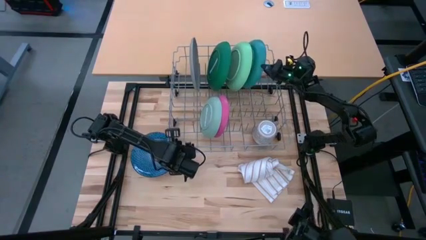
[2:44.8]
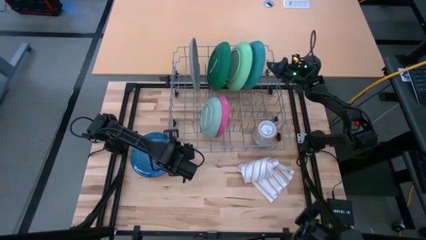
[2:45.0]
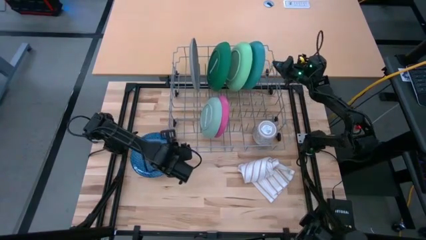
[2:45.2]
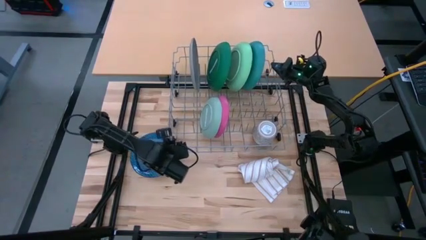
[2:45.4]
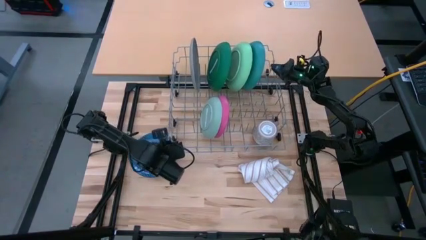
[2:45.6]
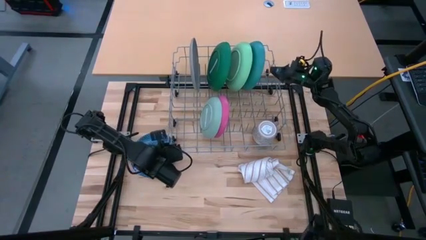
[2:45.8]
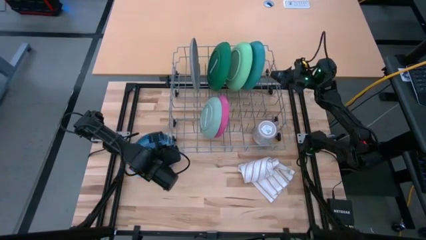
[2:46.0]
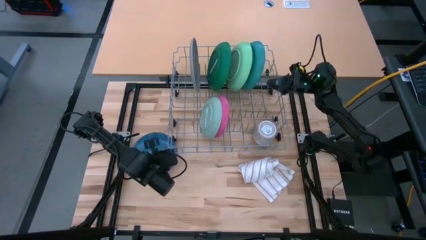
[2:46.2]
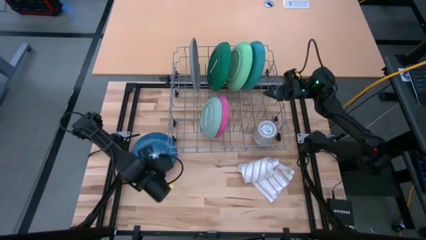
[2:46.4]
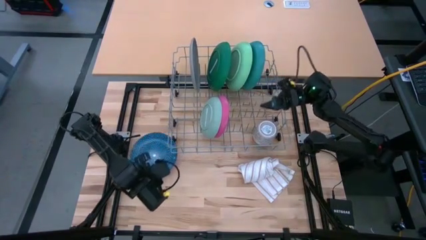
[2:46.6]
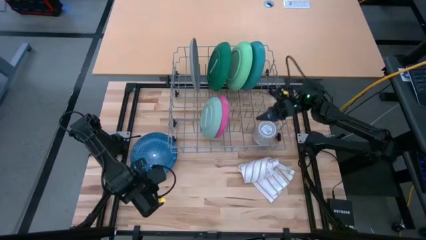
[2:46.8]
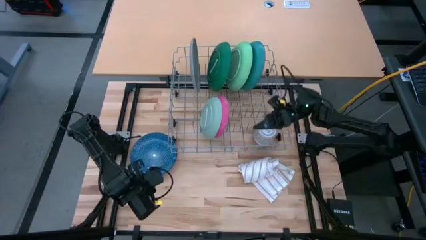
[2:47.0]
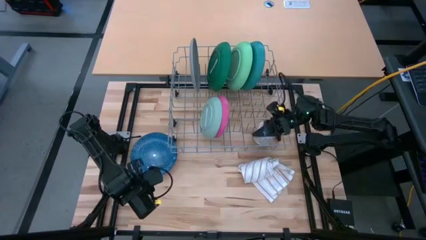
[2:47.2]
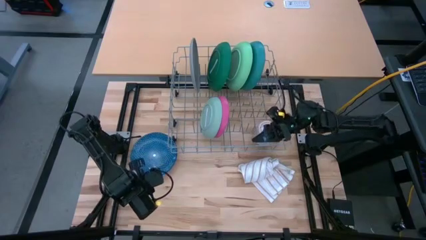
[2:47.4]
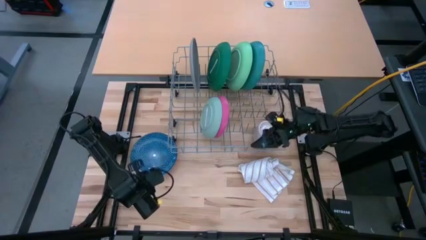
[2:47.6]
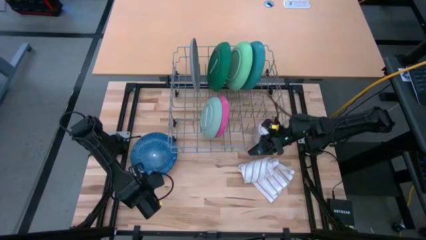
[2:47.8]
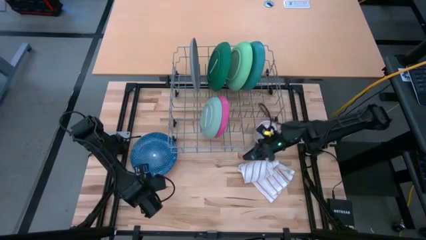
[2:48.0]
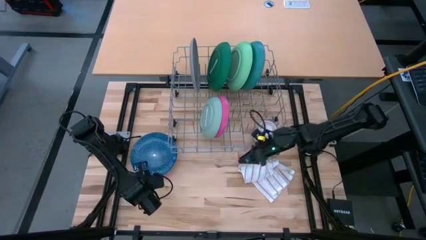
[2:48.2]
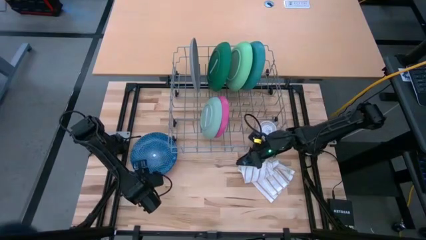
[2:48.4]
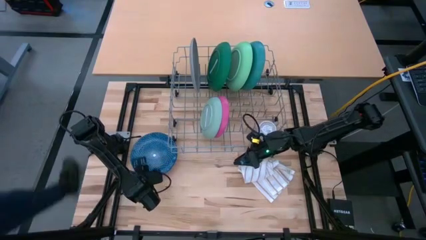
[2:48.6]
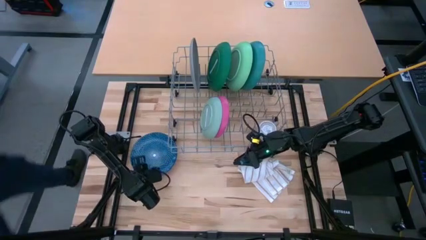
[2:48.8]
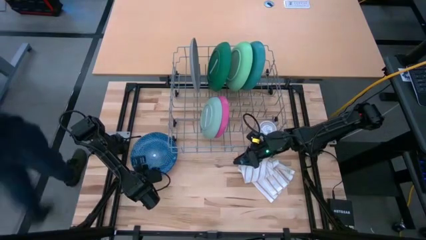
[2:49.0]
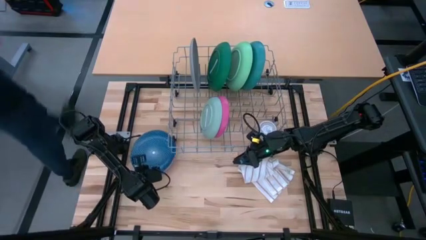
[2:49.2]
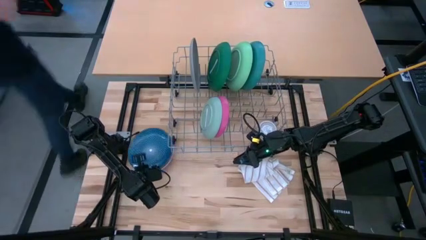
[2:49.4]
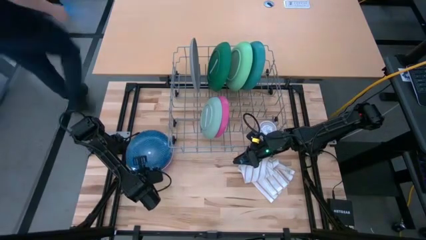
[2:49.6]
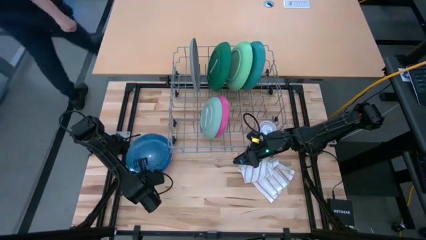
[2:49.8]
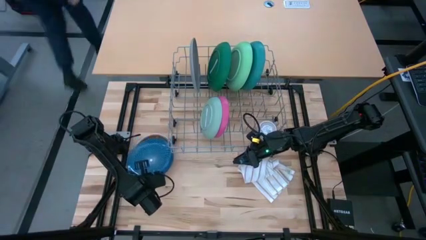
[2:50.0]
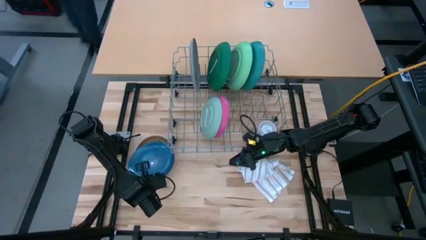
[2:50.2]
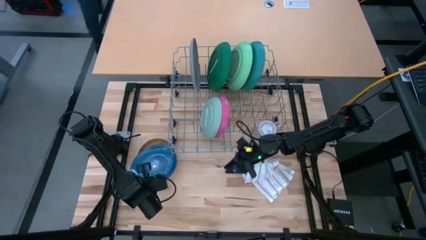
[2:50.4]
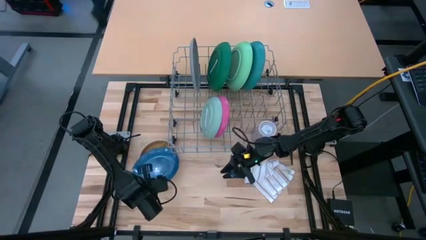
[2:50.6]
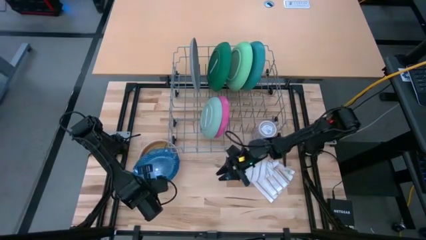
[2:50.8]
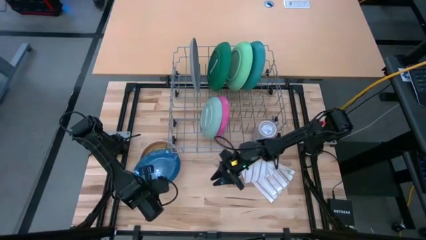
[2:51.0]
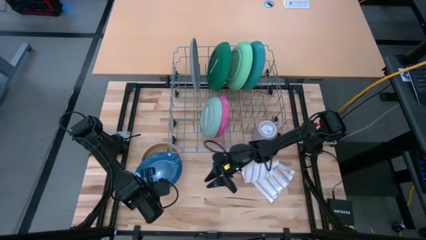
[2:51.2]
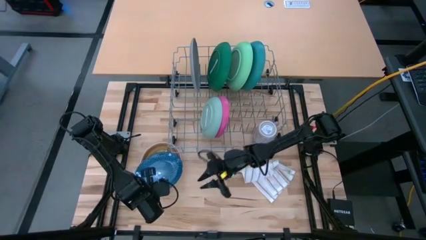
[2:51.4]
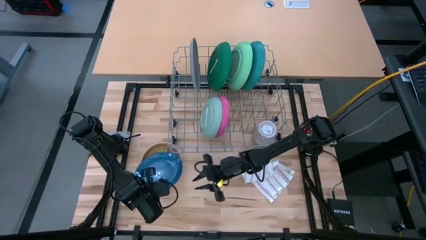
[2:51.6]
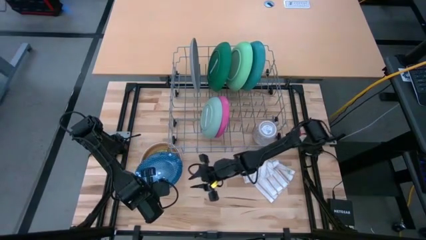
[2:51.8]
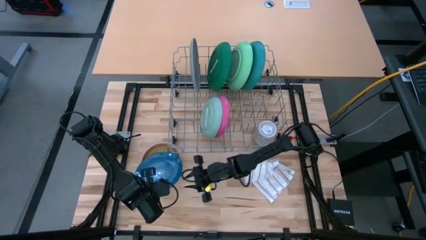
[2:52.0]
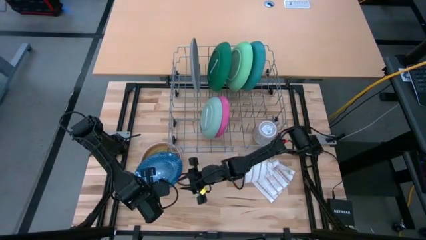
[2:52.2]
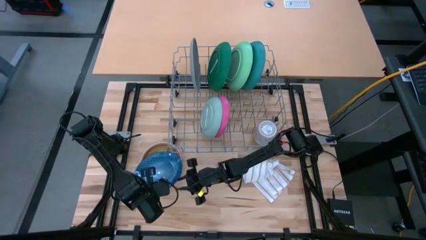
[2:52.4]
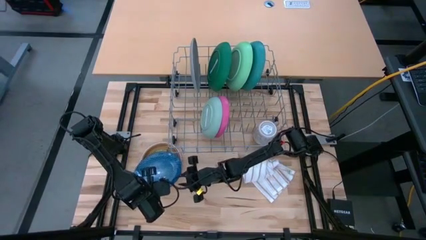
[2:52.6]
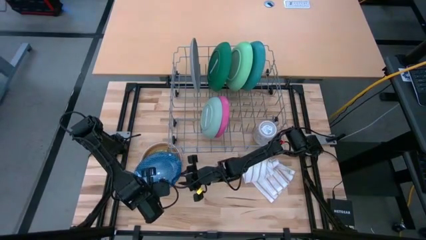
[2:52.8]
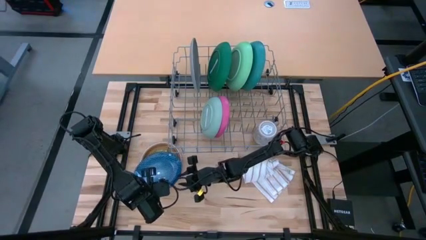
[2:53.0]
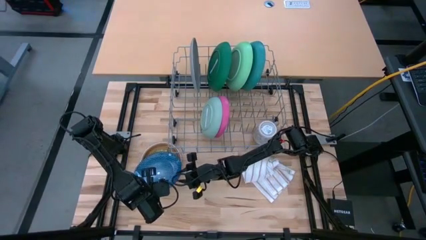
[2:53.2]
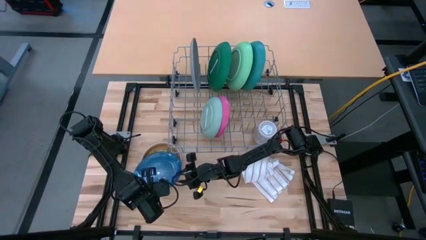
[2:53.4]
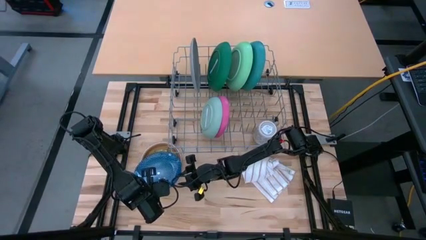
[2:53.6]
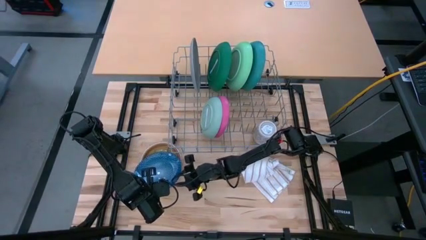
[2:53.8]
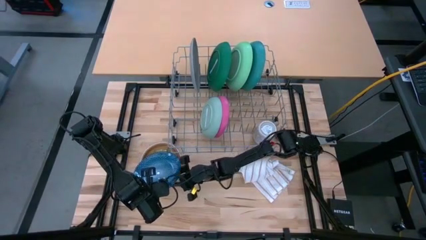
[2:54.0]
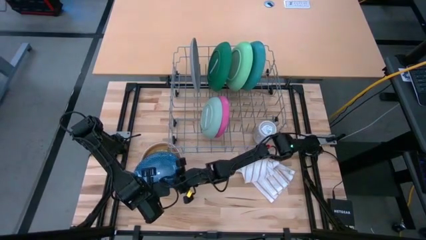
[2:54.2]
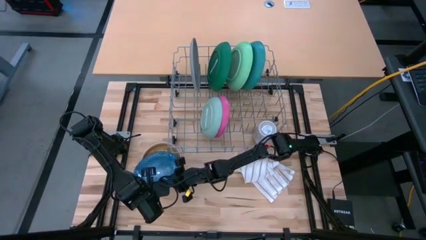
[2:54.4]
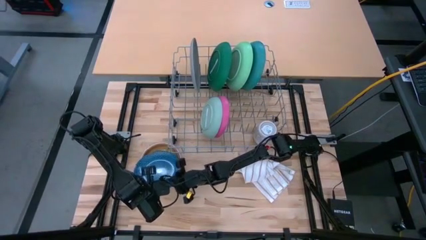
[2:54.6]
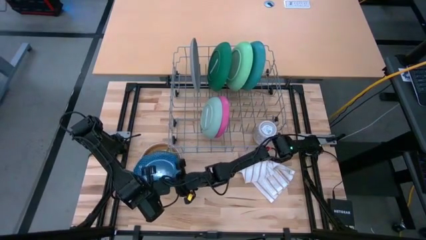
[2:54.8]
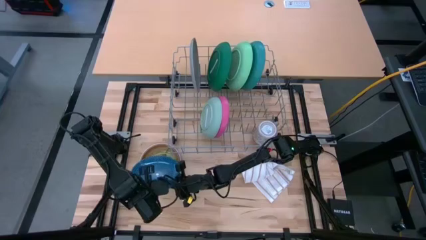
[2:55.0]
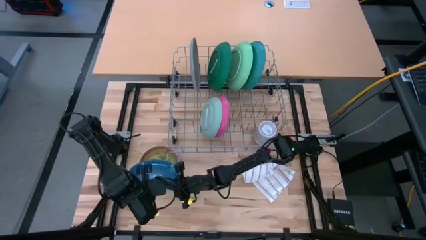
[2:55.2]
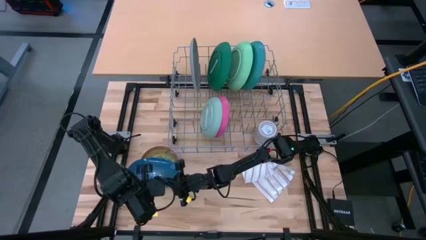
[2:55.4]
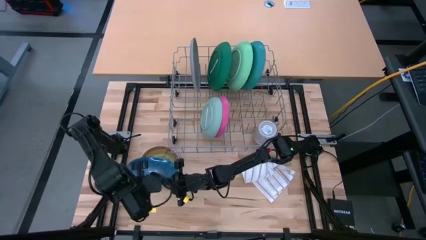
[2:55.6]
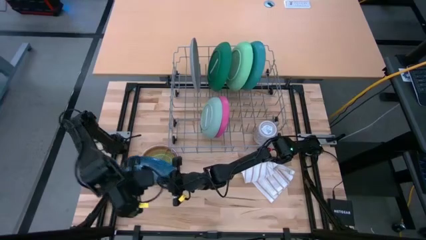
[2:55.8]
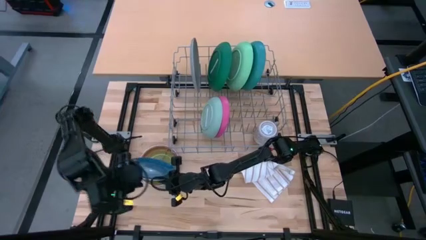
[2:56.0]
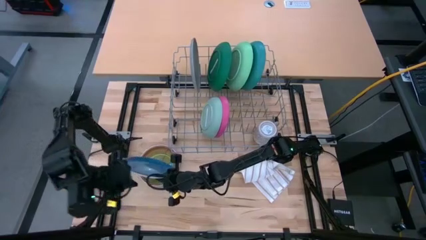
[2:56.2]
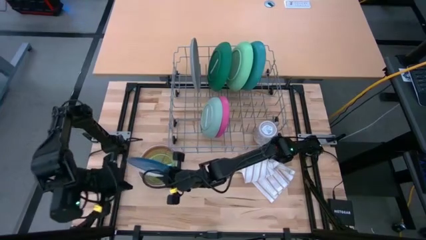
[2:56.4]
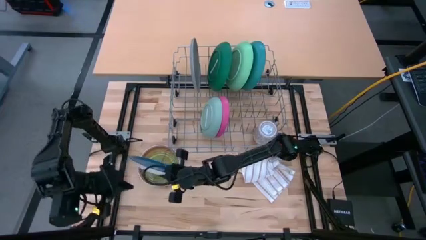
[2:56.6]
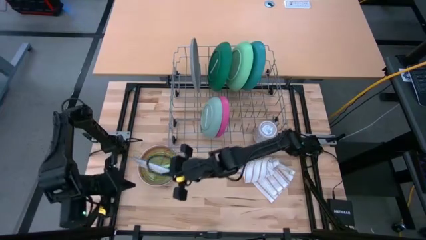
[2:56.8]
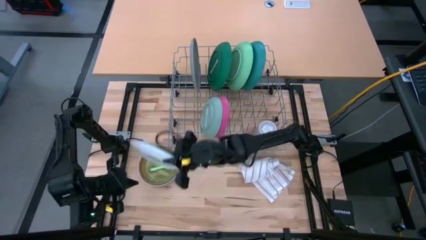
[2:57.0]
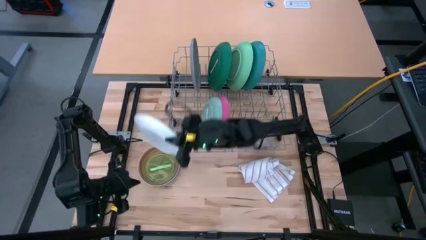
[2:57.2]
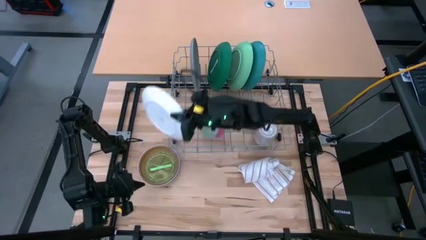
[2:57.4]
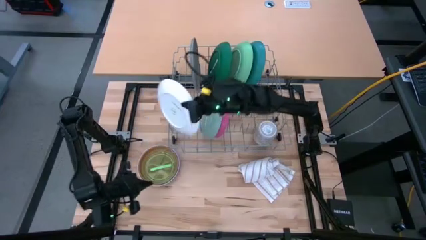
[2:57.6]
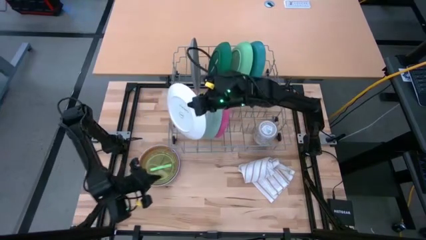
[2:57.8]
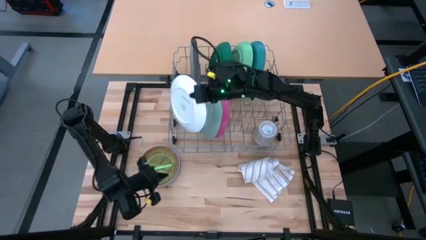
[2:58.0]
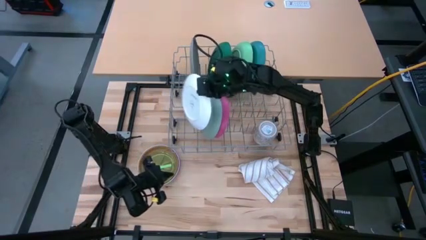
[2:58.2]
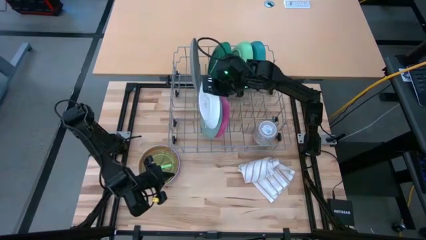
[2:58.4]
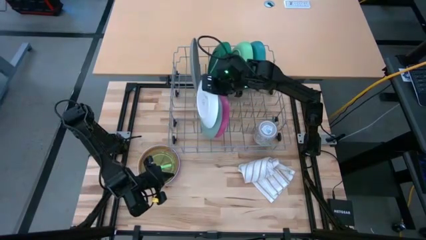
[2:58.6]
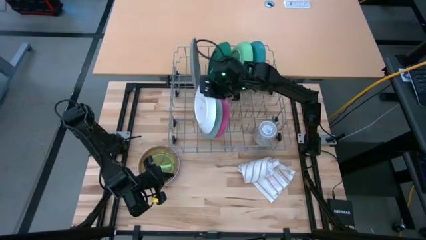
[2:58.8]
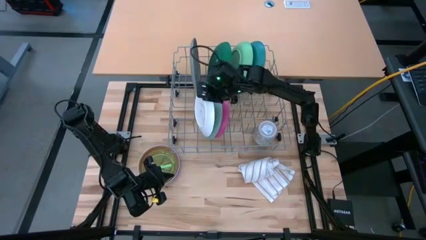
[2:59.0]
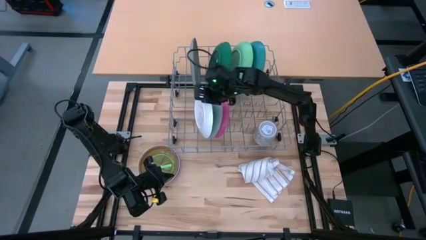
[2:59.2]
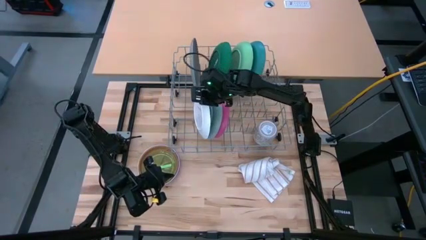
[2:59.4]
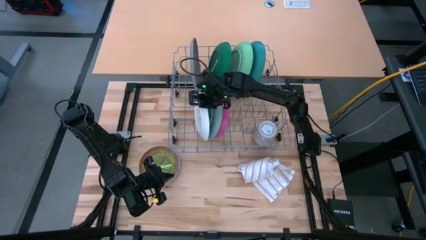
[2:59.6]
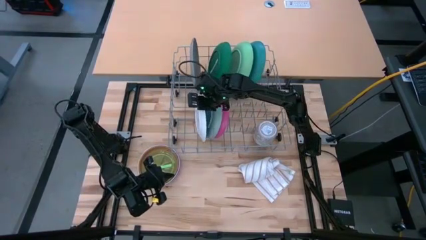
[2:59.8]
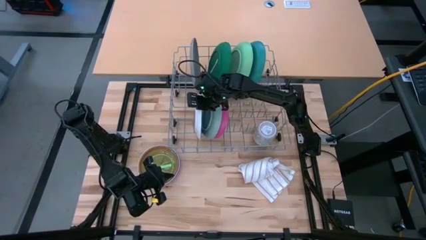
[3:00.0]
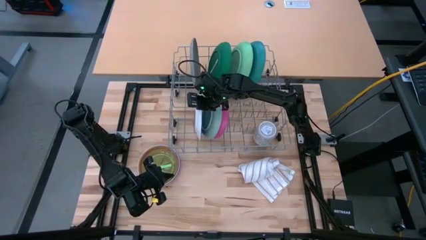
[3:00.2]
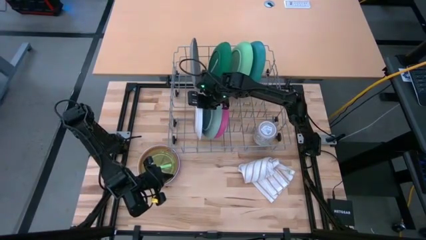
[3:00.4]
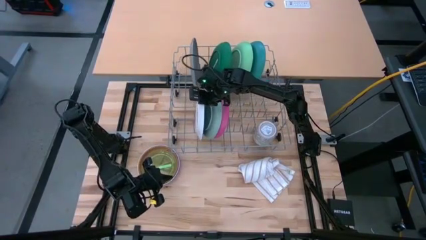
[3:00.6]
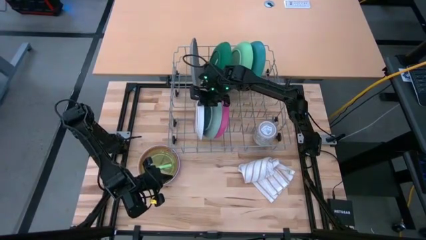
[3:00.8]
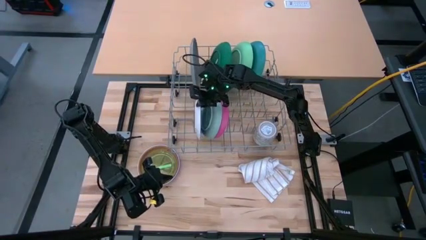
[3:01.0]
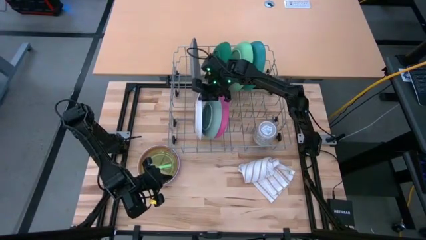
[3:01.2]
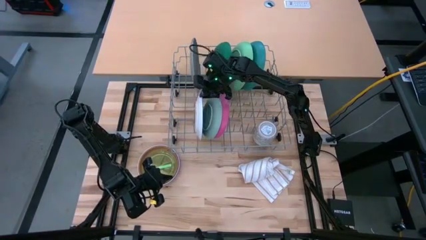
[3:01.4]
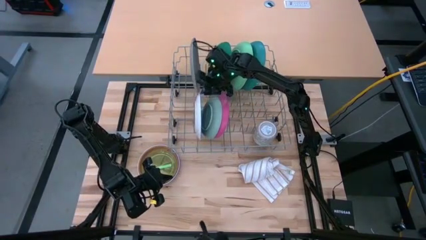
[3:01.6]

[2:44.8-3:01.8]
Task: Sort dishes
Put the dark blue plate in the dish rack
